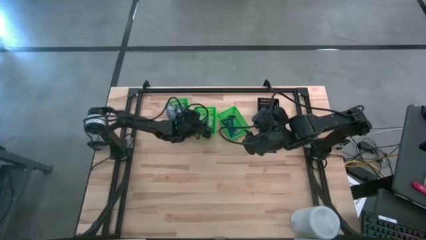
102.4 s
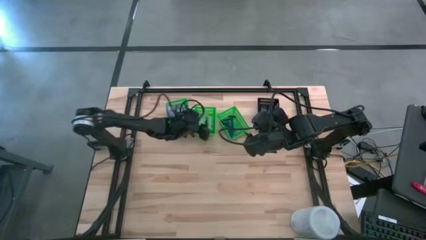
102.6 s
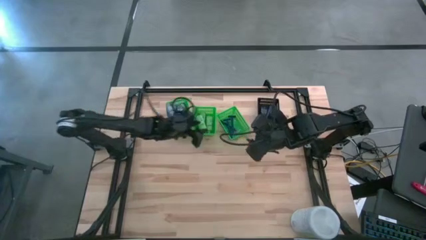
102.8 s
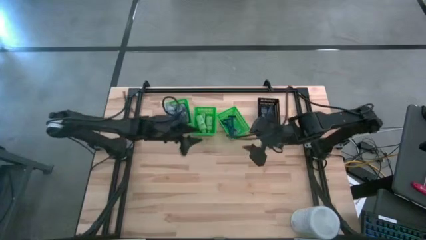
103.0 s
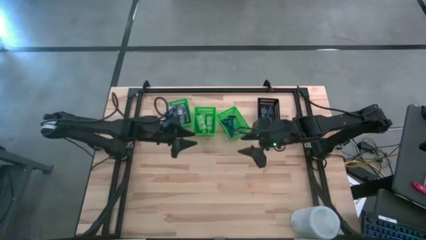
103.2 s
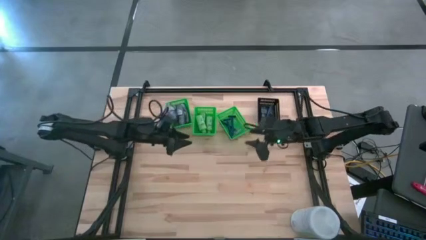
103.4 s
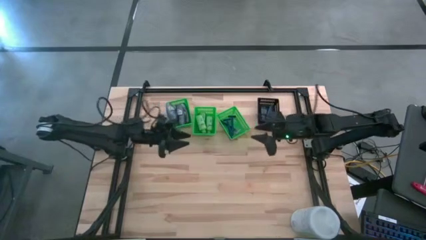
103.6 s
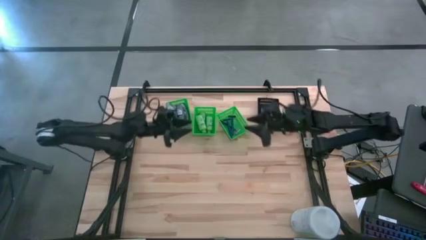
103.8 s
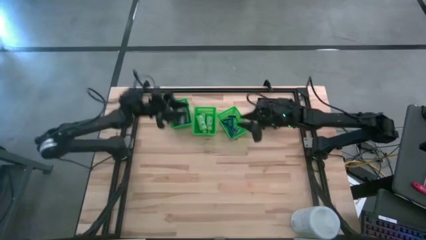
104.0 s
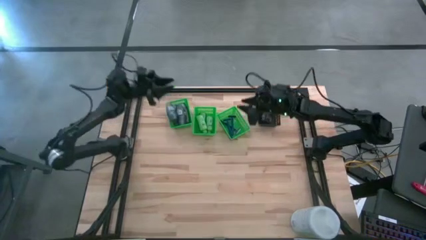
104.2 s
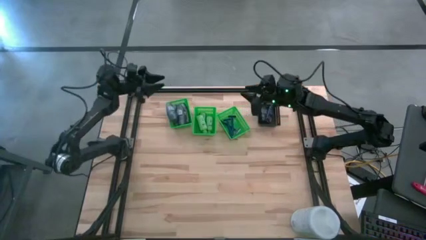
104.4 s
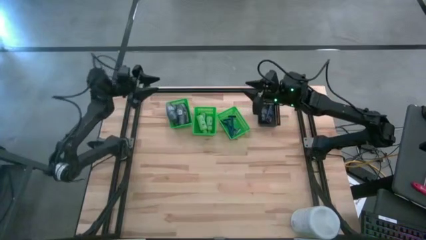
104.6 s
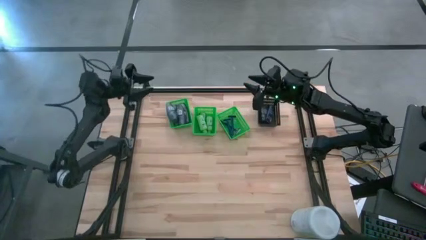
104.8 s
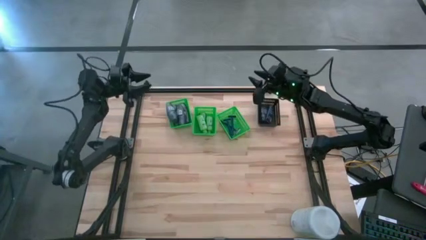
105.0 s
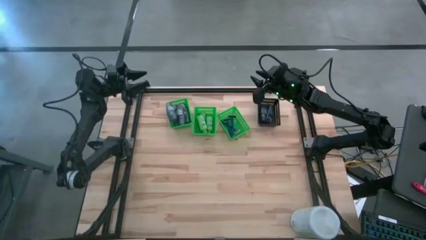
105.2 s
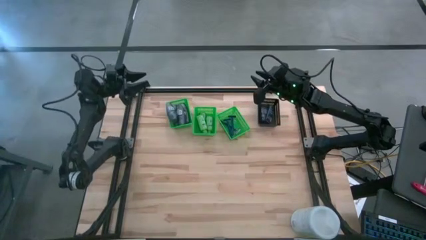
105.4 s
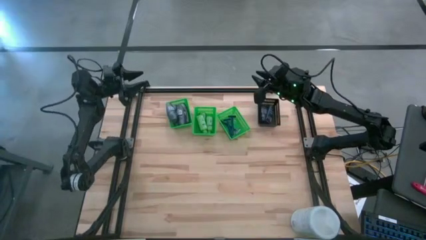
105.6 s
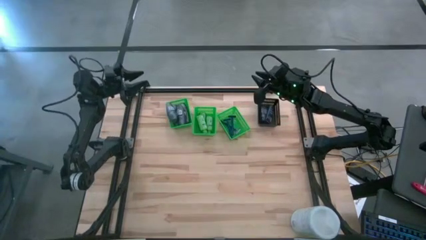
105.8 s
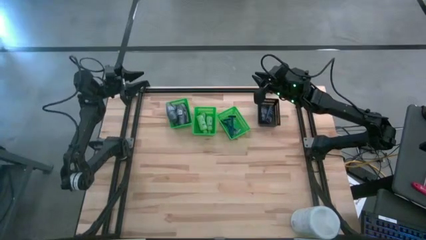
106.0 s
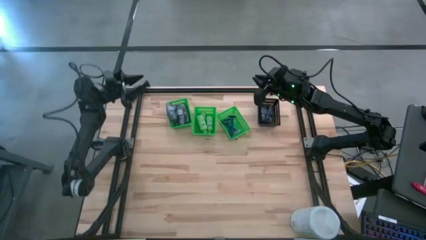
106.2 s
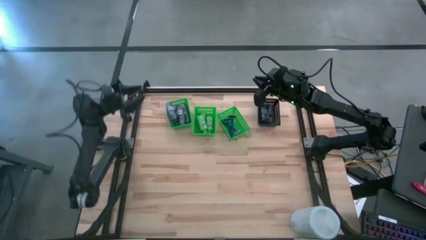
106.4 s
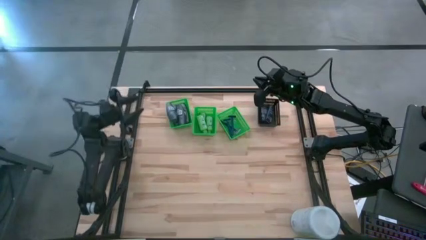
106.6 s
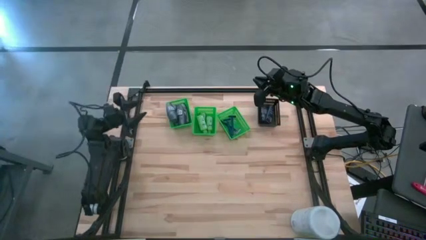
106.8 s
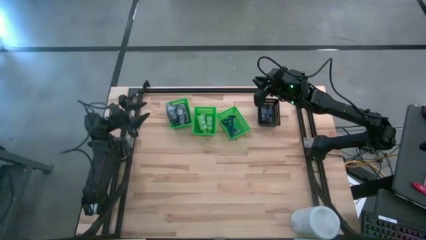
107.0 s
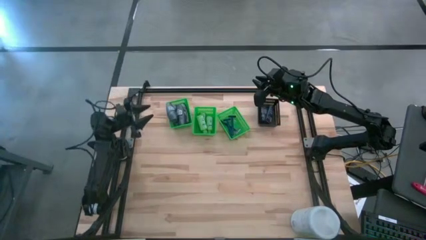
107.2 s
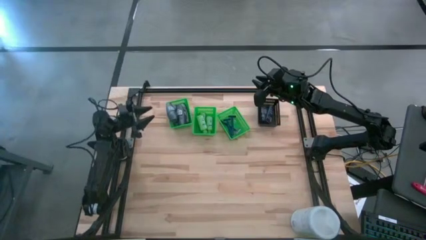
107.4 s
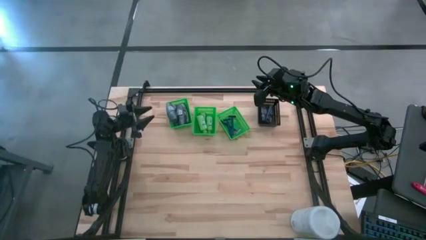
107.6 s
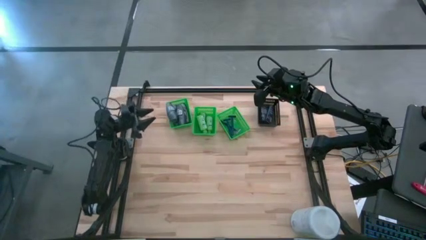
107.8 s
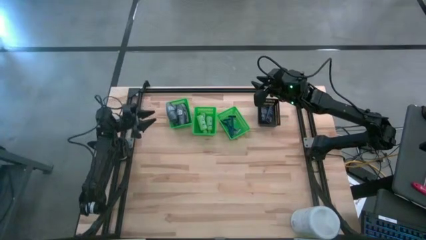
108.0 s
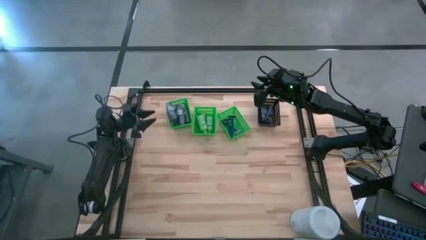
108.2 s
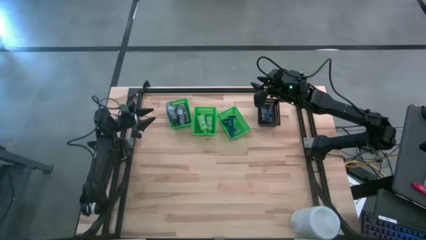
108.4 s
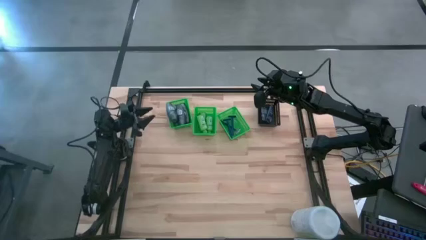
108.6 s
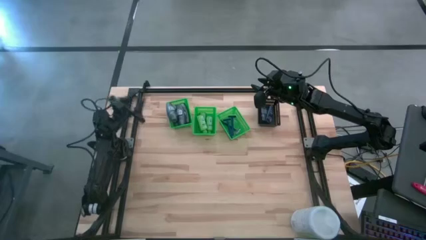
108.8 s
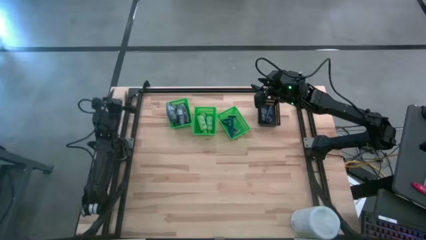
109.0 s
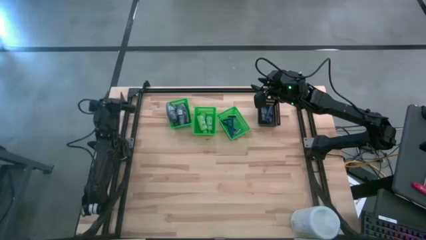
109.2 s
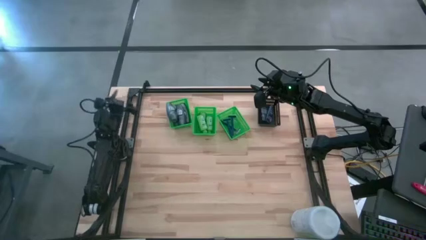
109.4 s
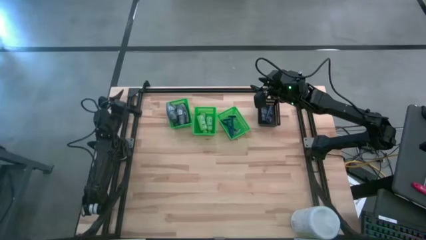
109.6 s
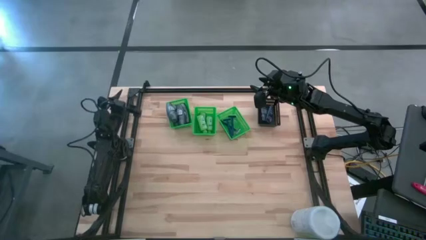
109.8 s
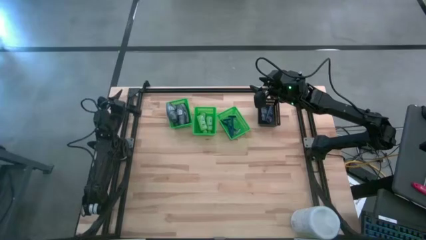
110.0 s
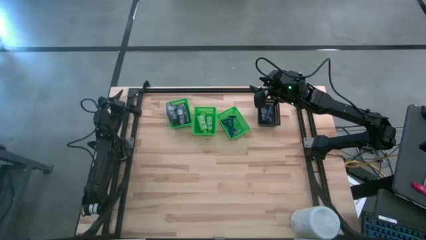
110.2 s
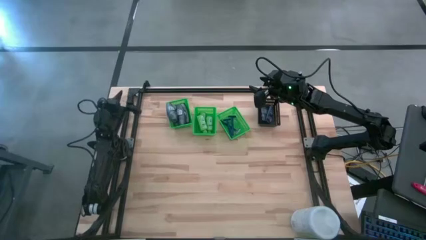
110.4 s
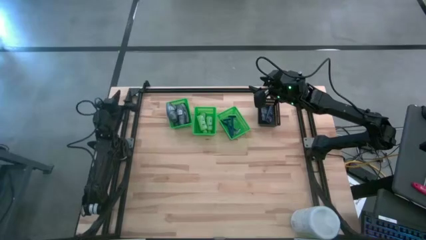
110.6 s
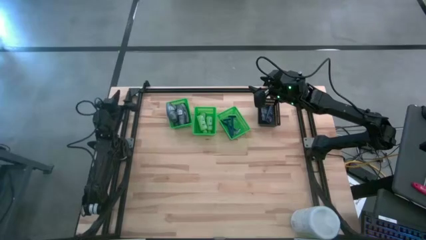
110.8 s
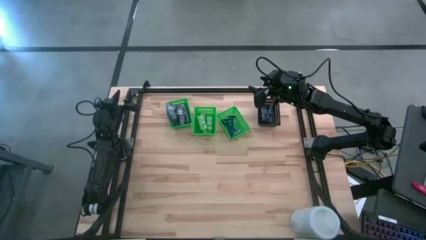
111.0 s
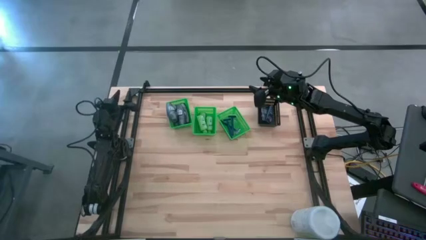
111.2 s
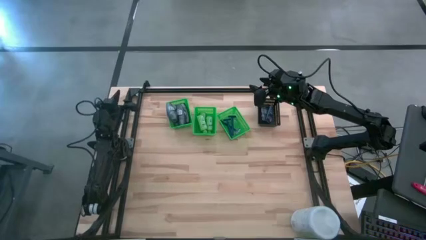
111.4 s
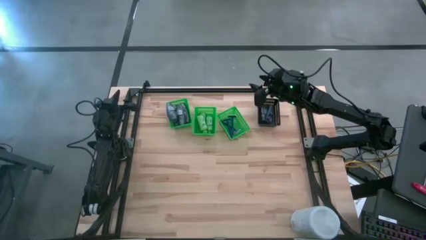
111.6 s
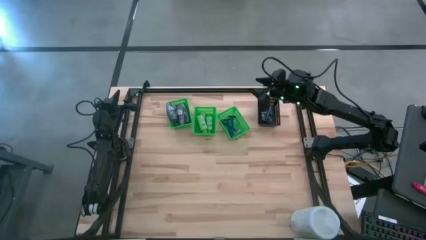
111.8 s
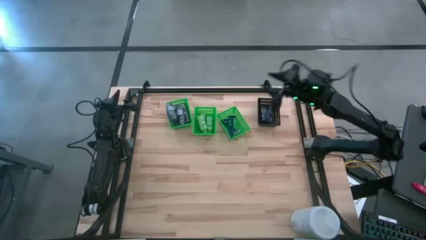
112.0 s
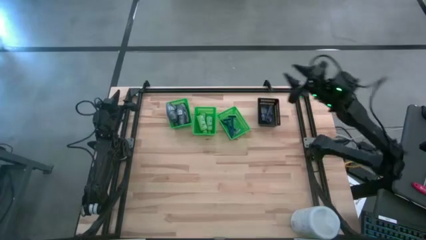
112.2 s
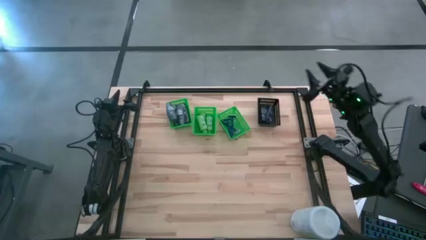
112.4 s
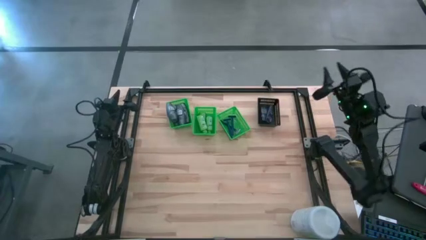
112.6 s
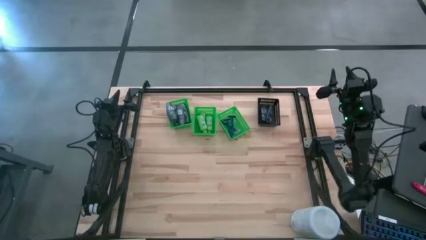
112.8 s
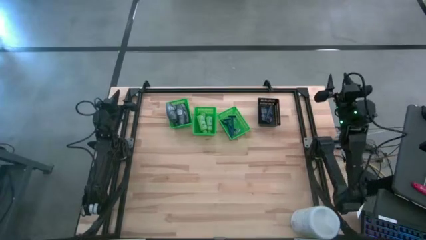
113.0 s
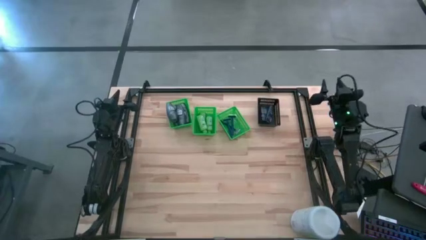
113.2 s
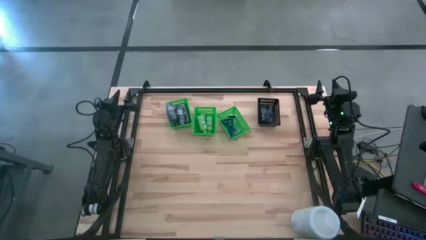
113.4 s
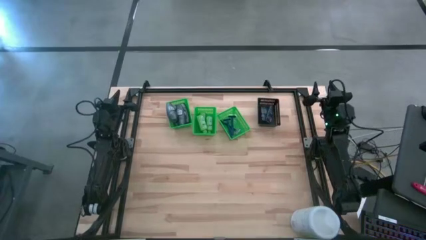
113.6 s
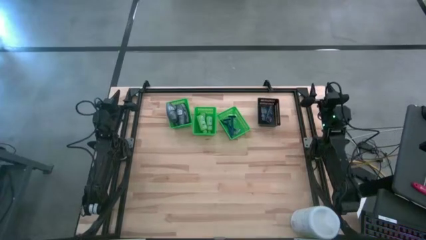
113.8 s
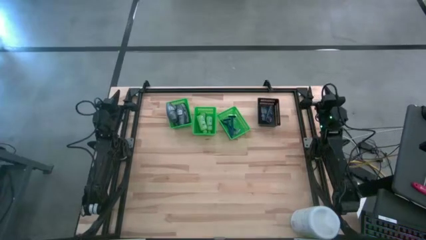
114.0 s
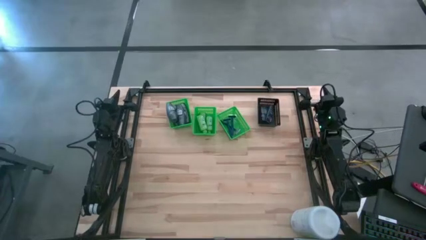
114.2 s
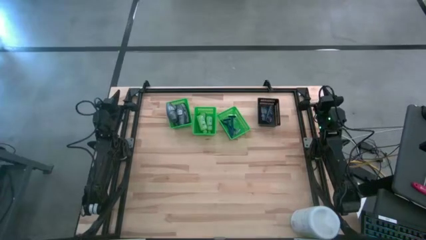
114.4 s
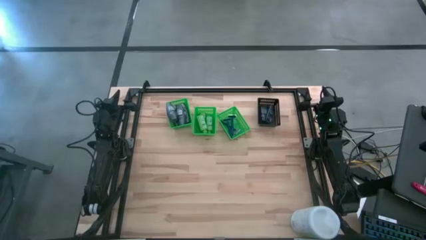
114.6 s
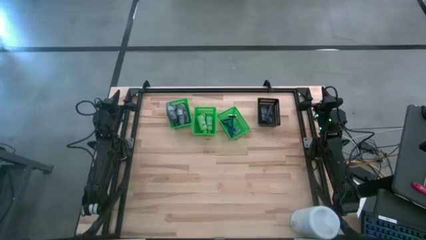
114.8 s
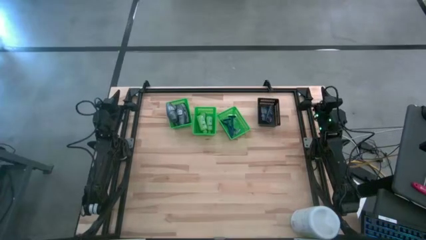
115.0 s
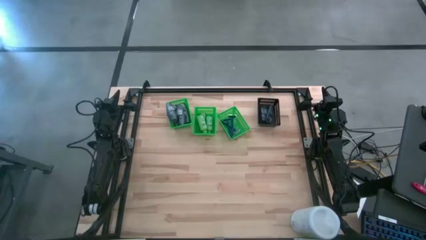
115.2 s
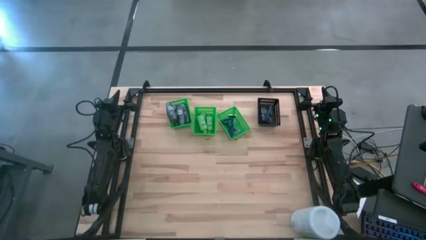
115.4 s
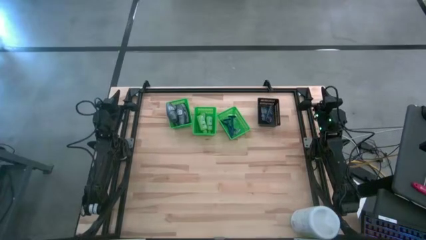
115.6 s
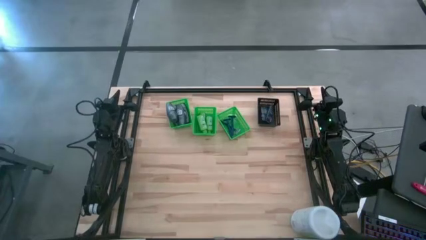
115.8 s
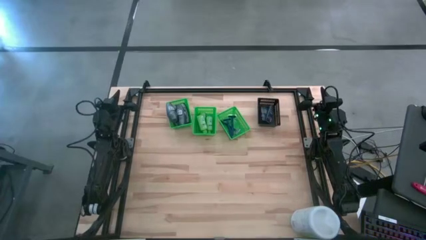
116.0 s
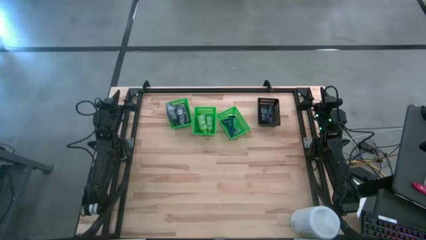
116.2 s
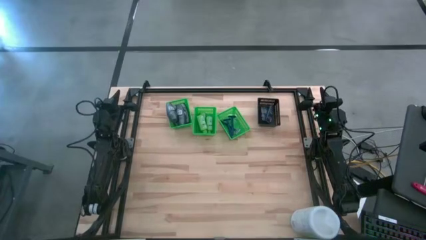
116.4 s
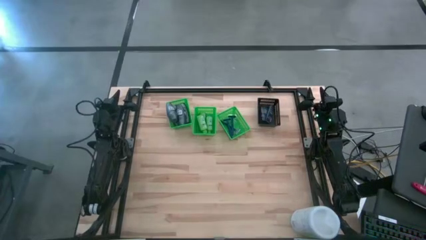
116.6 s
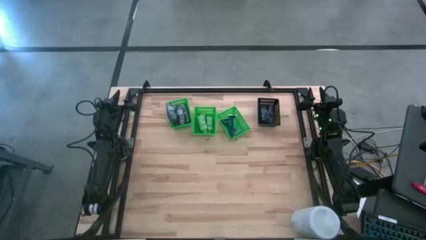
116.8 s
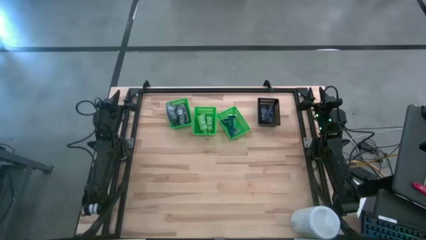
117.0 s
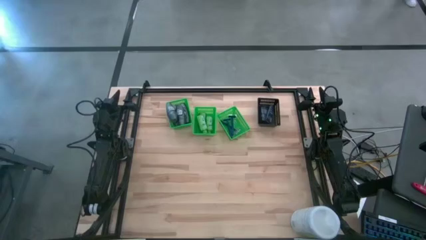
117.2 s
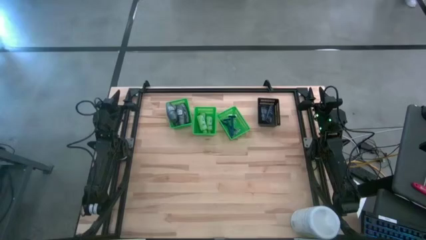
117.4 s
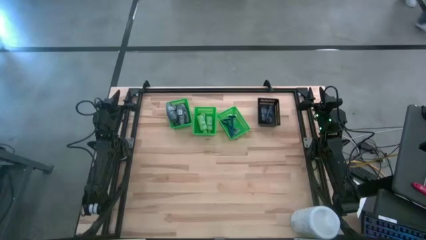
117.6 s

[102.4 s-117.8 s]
Task: Pick & Place Travel size toiletries
Return to Home Position

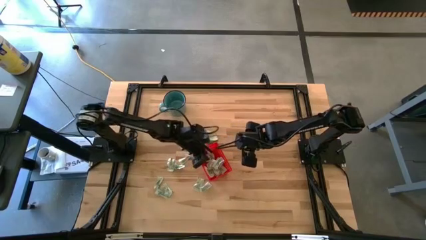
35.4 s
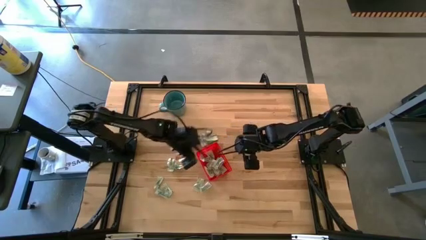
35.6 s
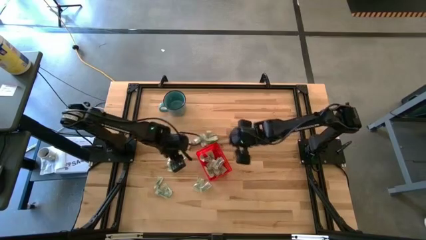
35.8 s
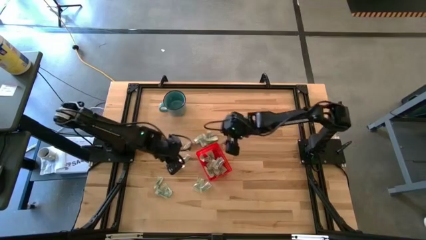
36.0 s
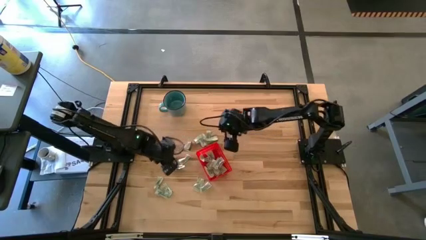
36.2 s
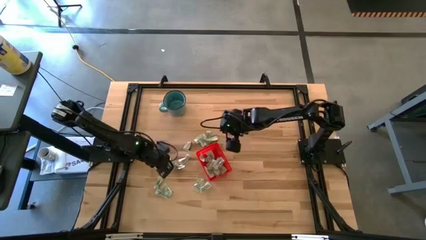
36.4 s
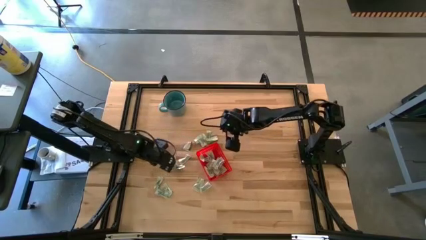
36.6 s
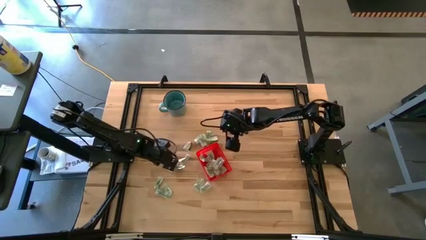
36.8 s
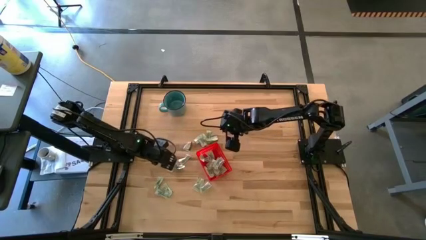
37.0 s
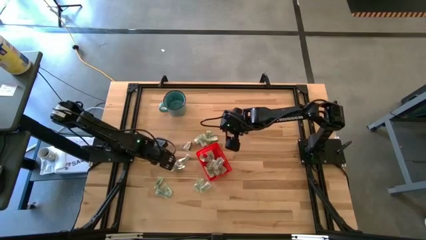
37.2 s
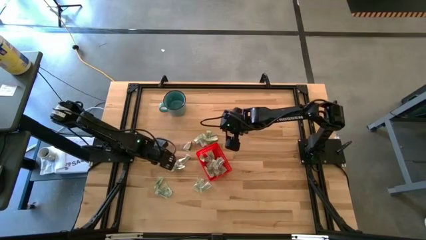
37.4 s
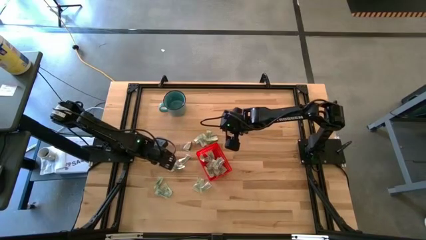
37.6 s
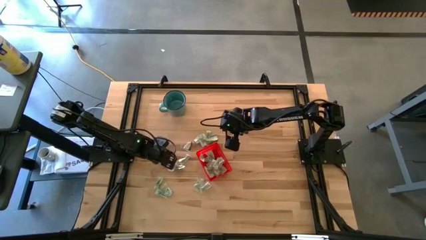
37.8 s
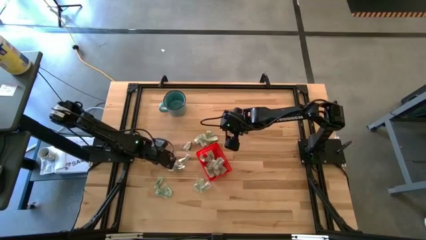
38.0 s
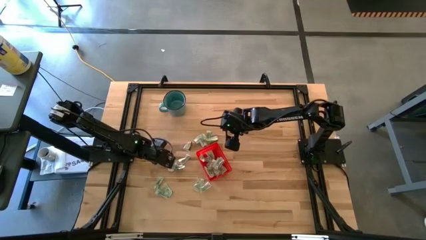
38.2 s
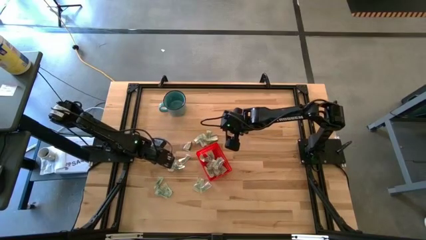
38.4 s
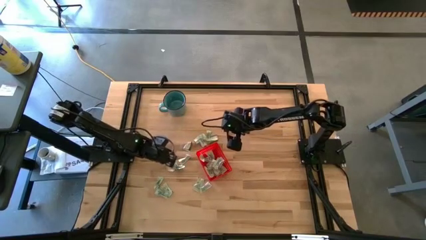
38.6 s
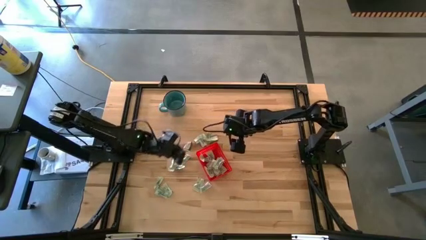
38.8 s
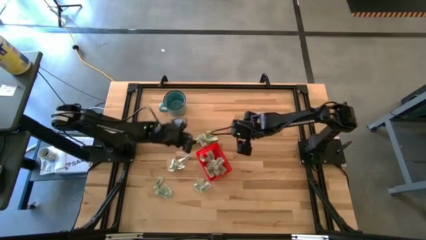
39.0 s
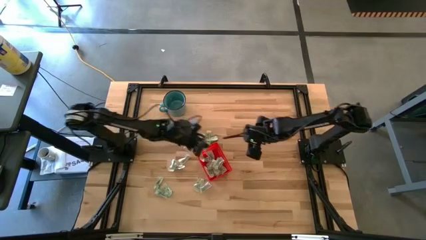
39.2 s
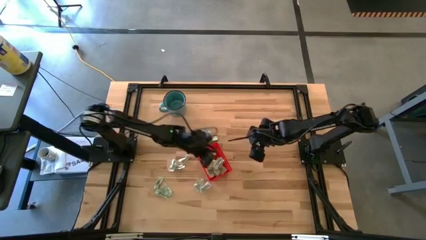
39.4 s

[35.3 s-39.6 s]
Task: Pick and place Stevia / Truvia into bins
Put the green stevia packet into the basket
